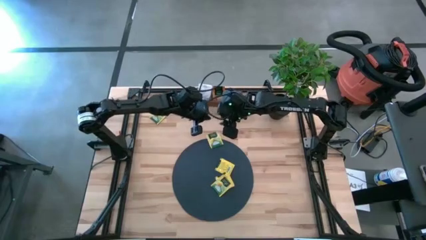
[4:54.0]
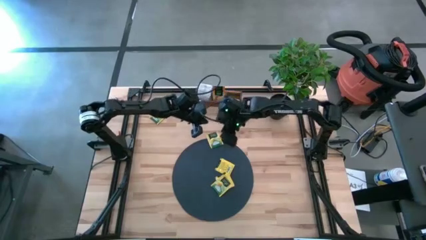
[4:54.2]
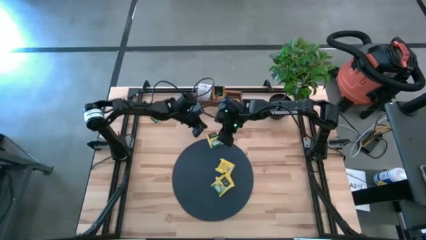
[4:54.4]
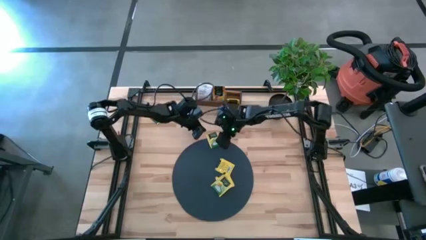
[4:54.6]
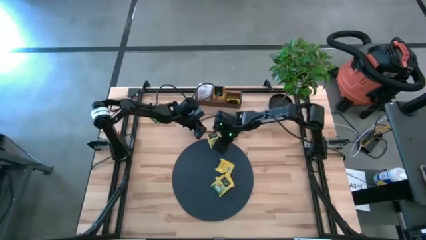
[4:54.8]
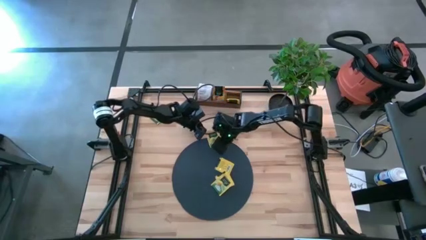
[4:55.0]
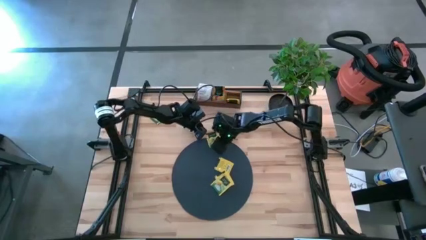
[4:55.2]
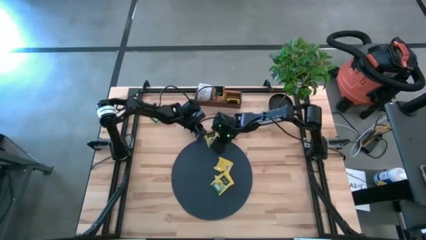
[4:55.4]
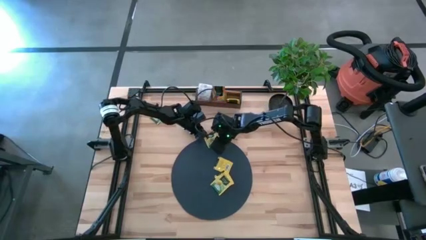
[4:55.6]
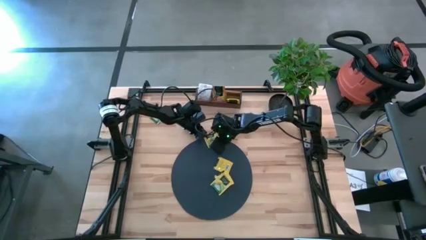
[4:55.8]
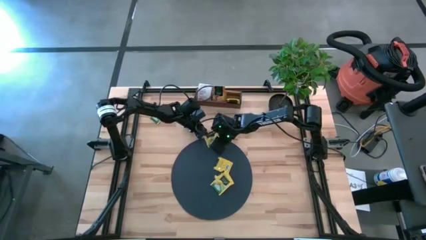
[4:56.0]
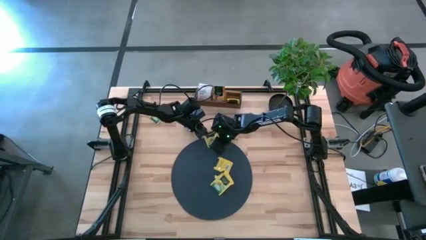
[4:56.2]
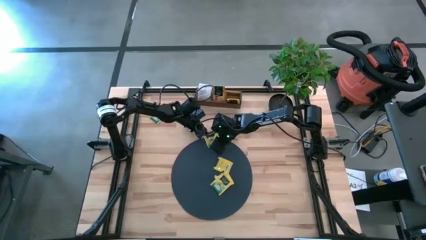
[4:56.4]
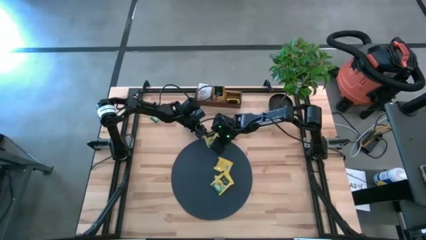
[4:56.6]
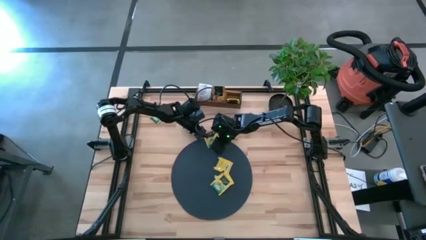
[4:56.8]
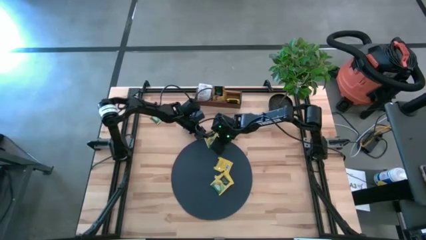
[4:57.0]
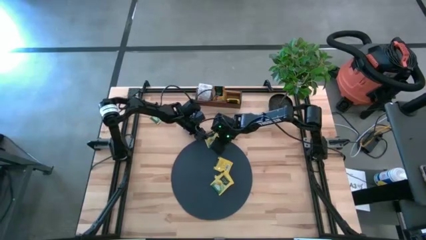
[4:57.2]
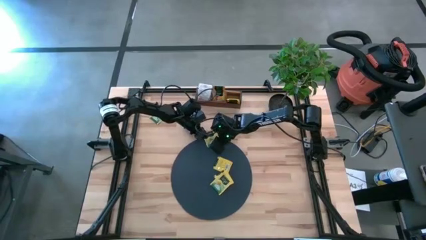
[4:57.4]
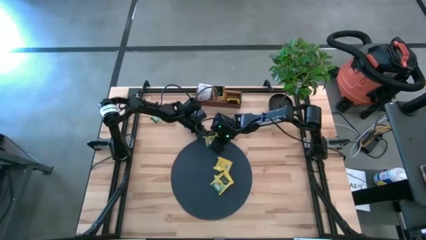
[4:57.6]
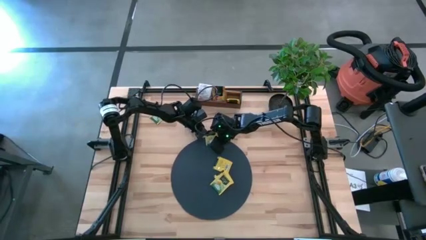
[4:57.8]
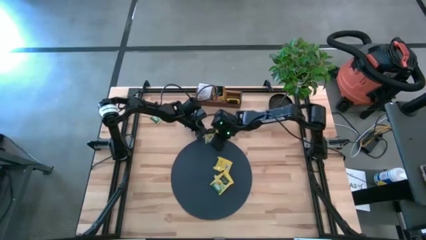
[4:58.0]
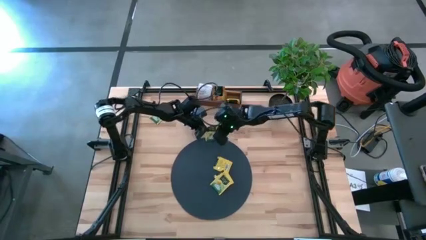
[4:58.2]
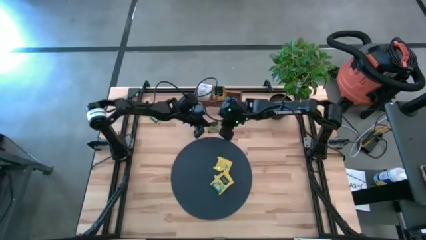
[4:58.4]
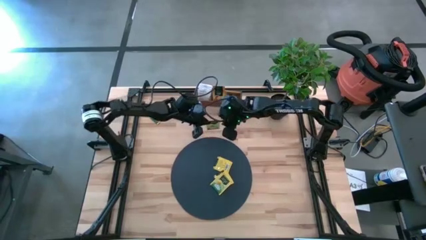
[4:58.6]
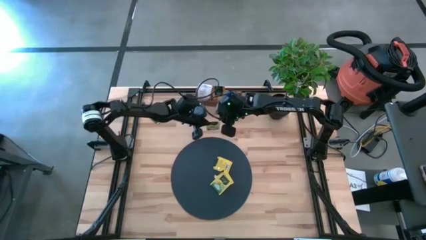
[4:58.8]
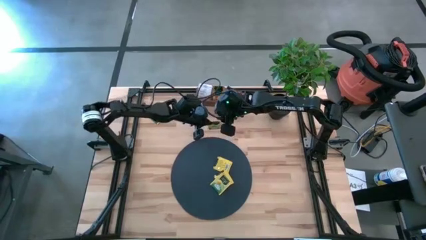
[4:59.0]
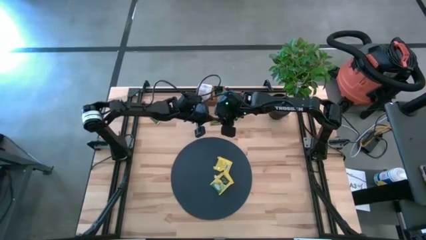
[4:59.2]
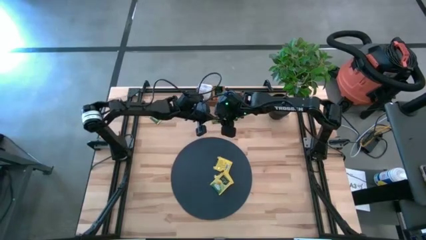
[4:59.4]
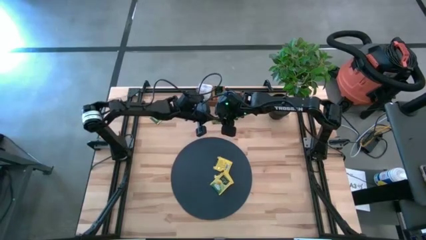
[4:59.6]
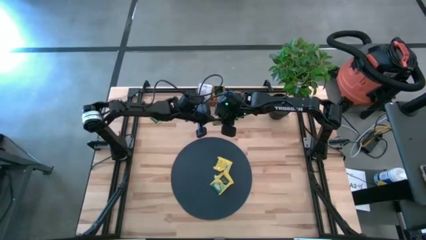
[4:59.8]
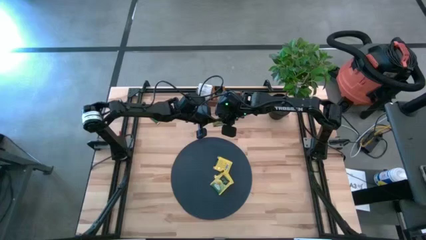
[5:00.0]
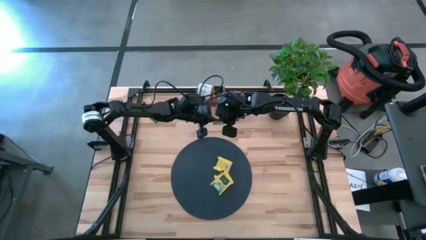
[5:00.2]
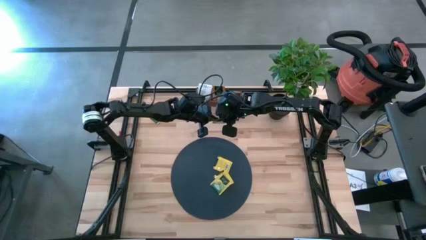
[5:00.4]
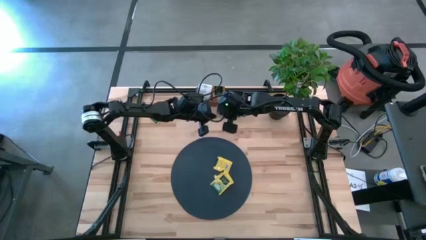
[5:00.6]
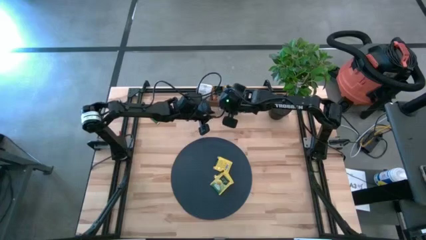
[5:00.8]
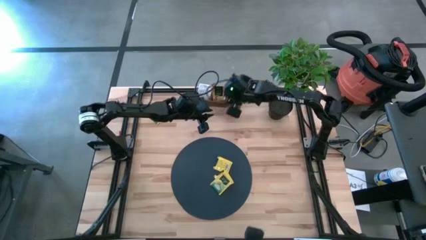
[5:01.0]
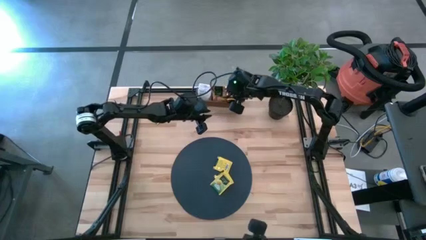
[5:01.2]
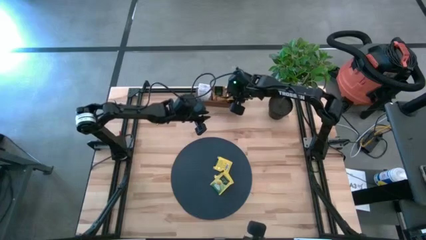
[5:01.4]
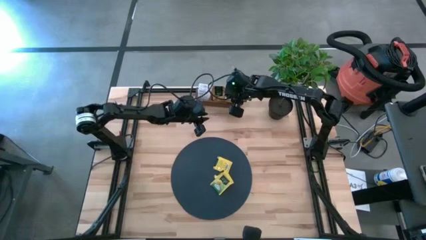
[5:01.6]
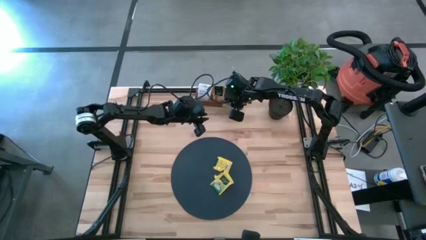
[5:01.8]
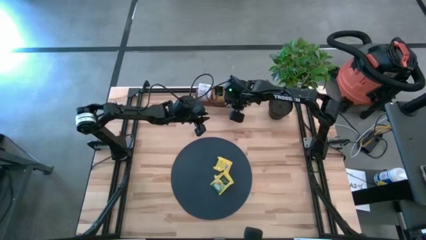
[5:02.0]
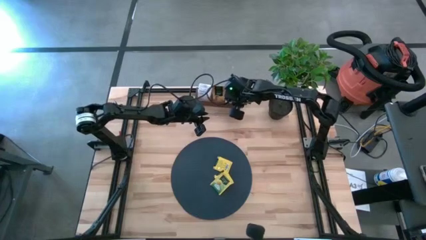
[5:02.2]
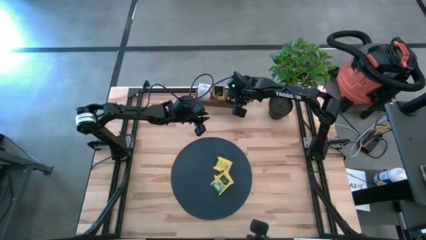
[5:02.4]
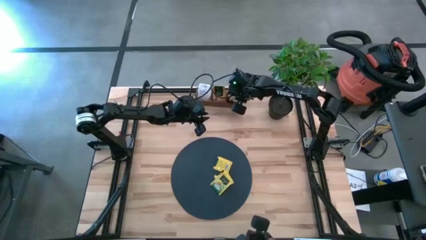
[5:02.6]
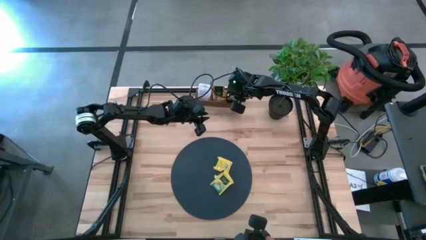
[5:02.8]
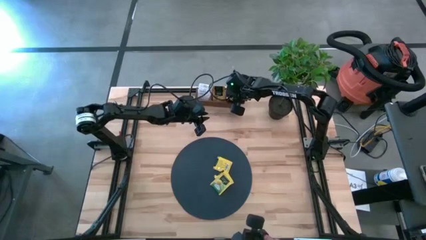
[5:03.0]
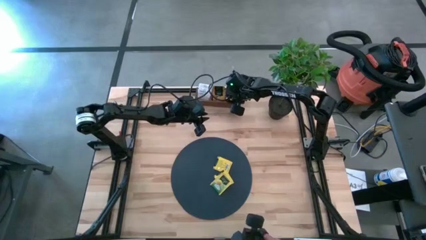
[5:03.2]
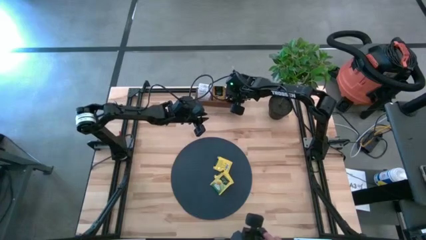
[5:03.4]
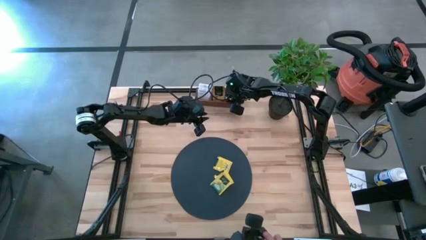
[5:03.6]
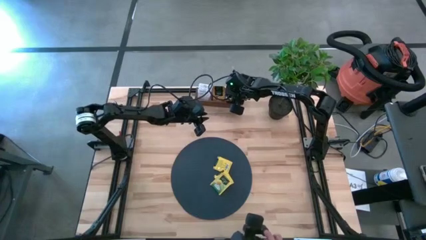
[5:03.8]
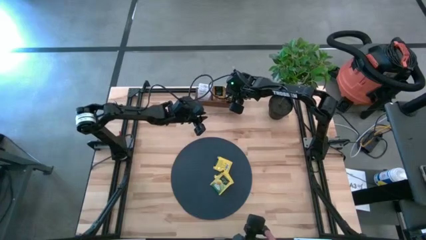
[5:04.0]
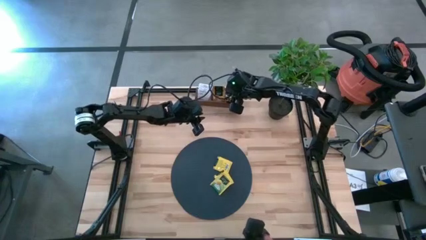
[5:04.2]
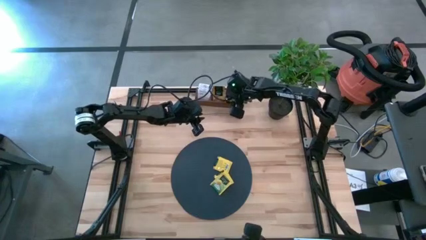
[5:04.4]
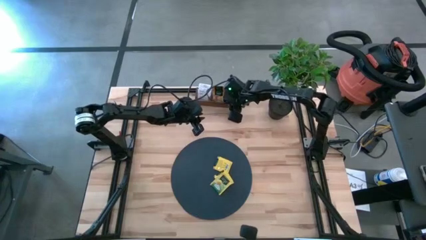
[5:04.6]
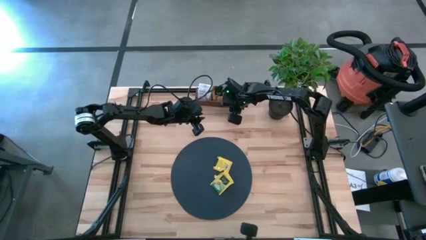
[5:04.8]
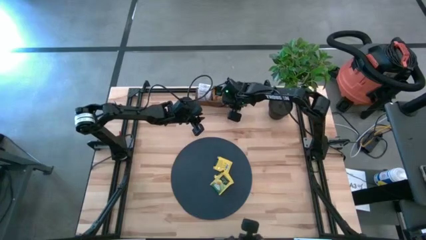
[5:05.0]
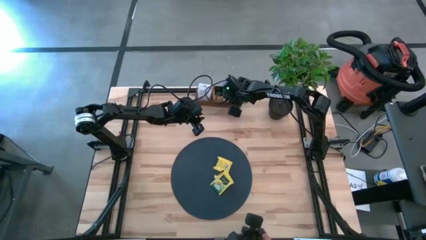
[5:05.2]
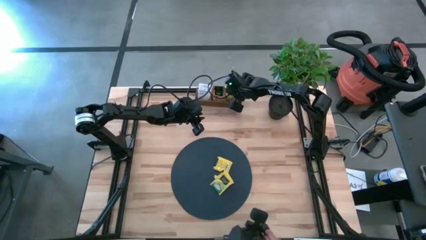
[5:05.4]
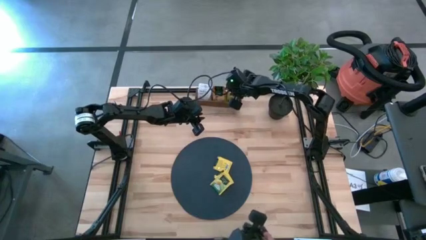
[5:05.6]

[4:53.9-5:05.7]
Task: Pick & Place Tea
Put the green tea bag into the right section of the wooden organizer

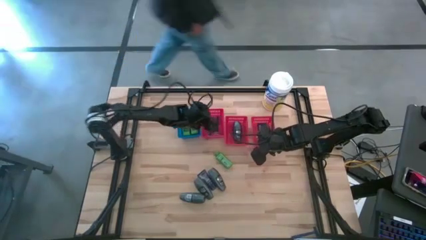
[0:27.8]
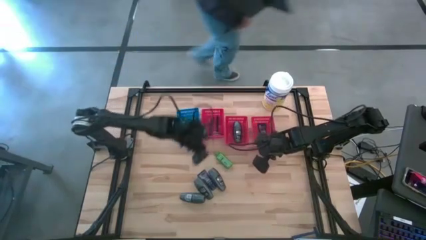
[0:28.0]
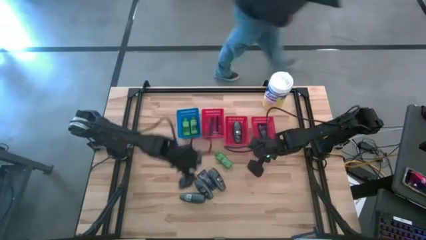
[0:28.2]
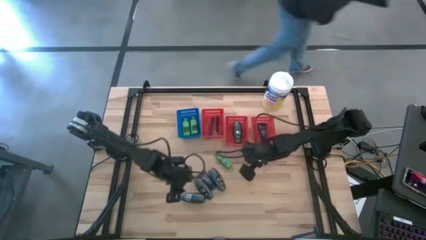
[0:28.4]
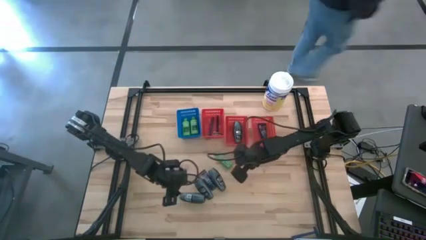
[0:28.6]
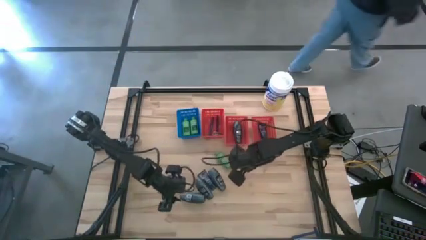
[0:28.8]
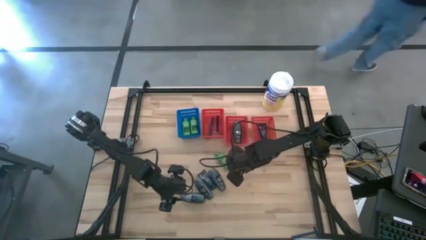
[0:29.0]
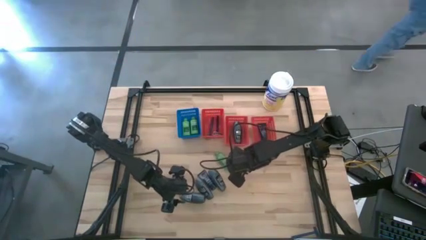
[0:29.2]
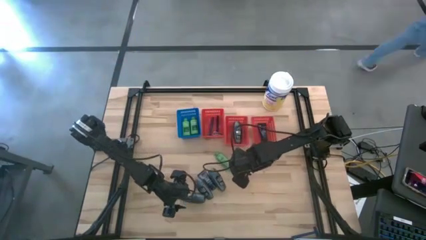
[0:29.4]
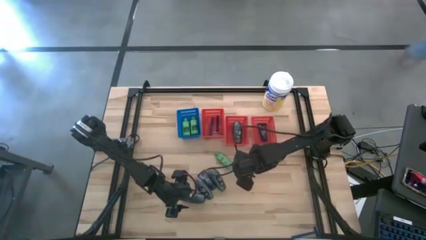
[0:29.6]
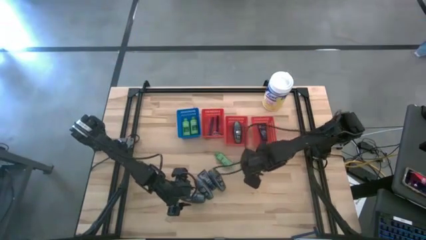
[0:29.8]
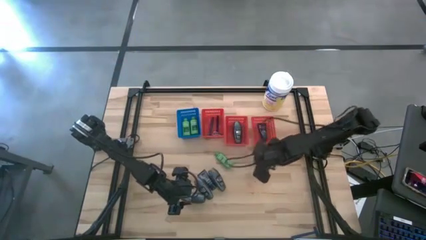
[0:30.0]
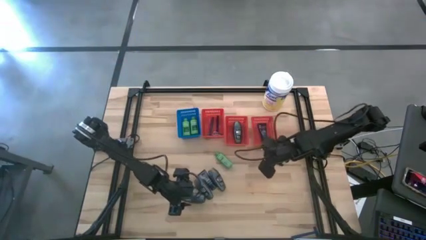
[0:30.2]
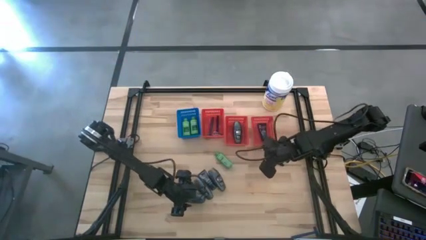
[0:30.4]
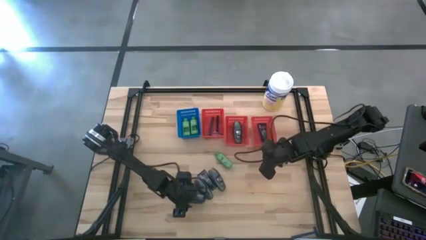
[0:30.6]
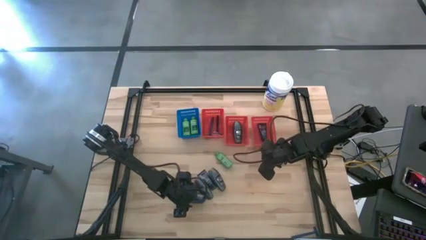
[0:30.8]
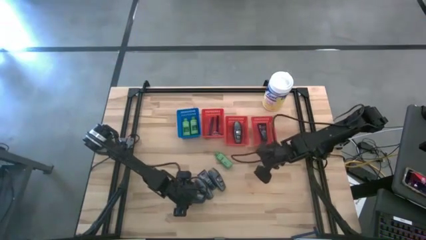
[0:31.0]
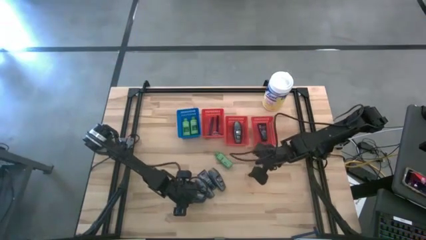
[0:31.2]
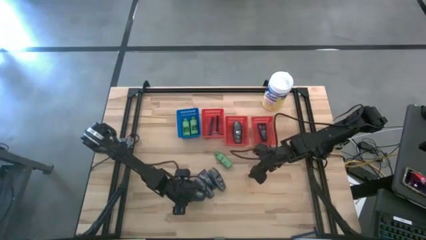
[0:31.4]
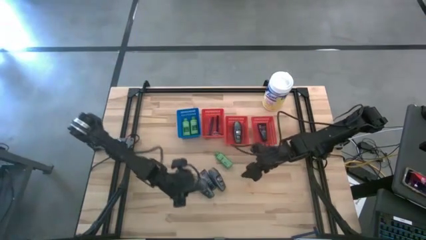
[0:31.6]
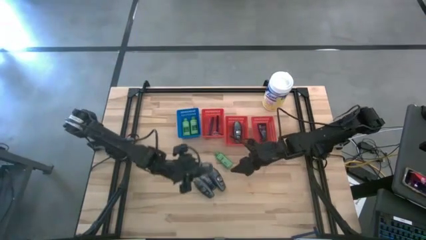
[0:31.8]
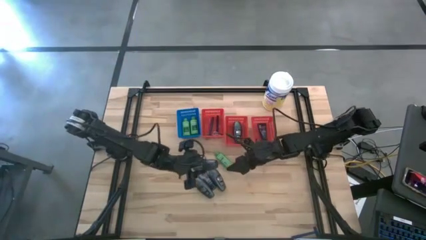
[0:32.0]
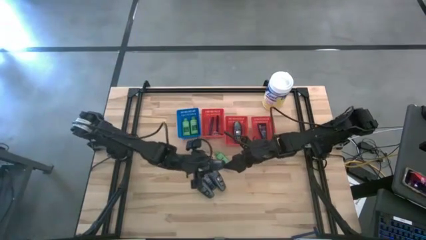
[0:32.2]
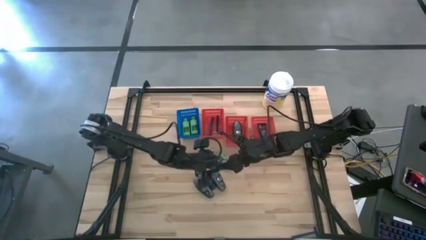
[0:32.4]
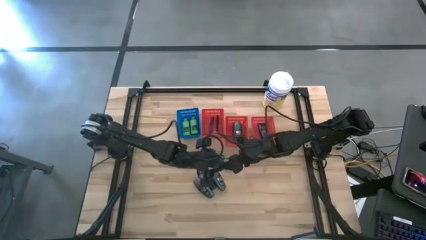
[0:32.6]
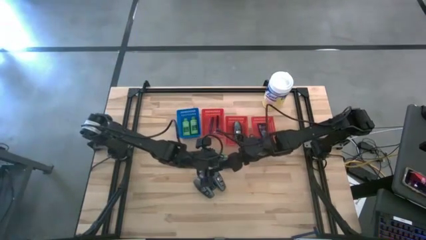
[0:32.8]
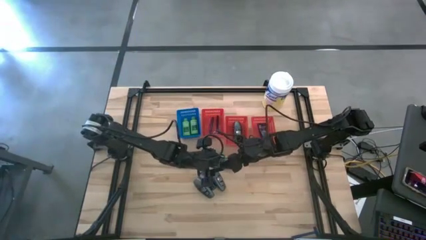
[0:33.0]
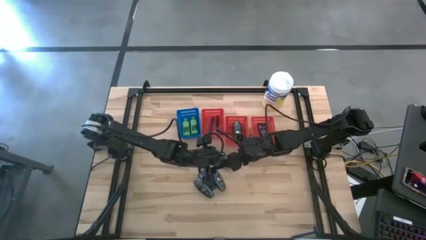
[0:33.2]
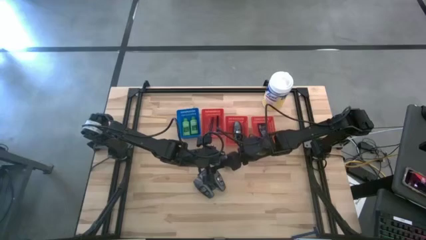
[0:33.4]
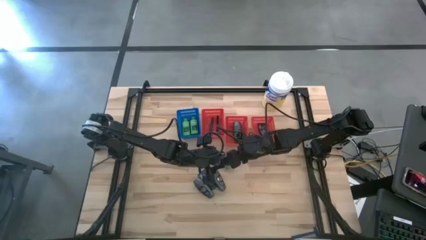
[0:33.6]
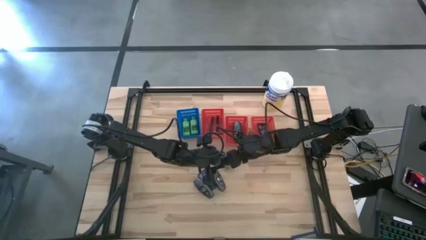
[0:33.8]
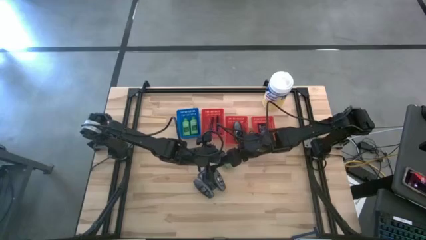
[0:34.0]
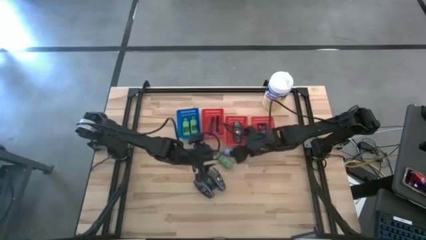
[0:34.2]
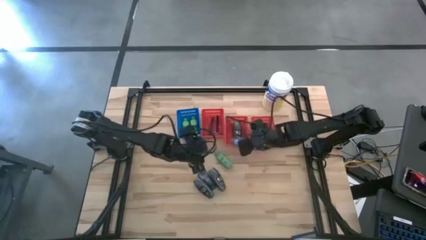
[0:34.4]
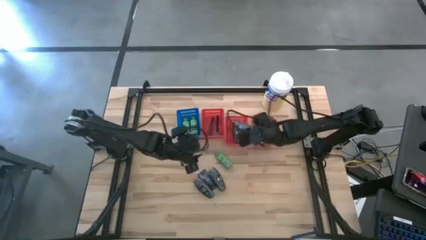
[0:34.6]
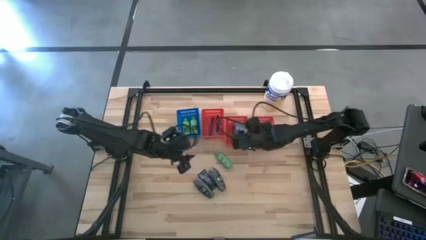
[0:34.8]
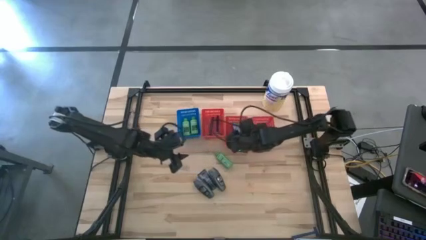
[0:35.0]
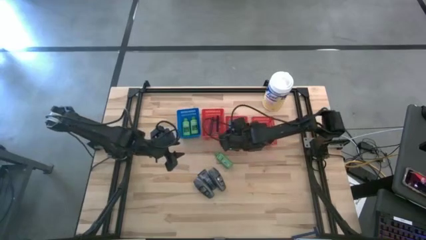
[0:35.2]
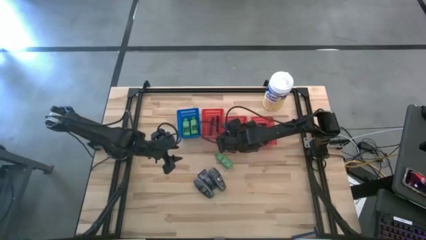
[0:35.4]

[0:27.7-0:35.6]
Task: Pick & Place Travel size toiletries
Put the black deodorant into the middle red bin
